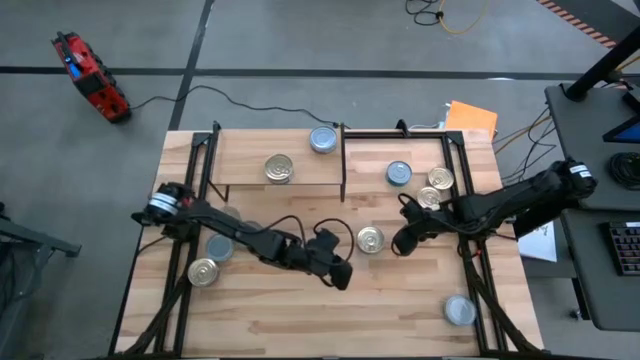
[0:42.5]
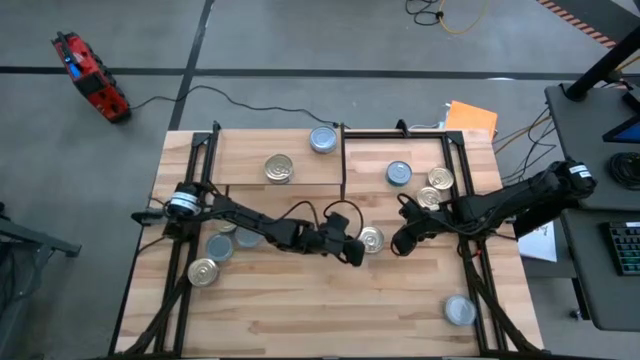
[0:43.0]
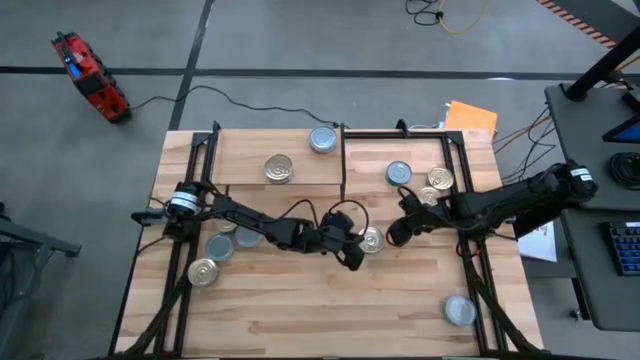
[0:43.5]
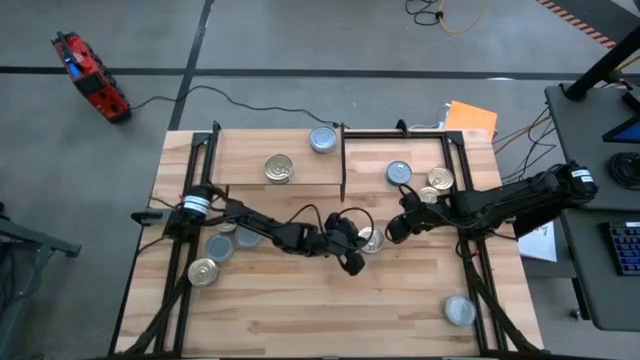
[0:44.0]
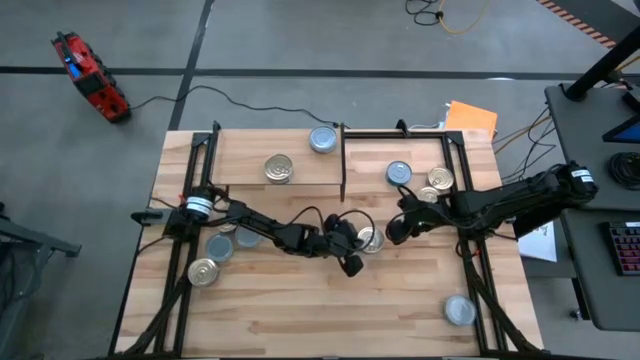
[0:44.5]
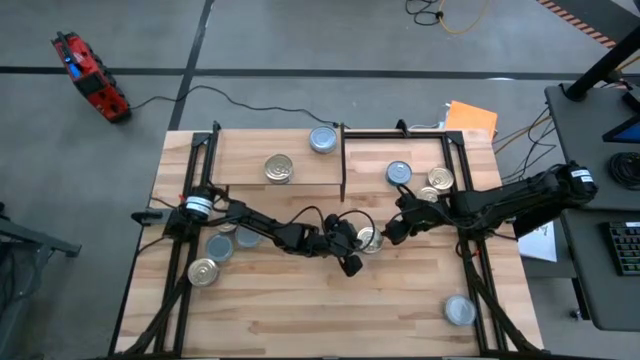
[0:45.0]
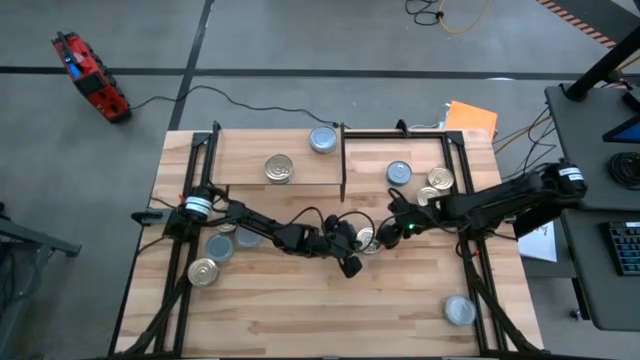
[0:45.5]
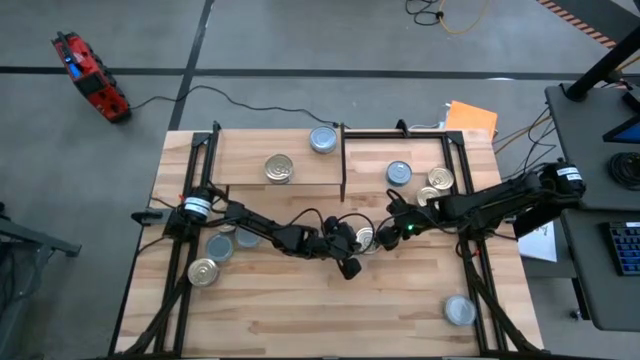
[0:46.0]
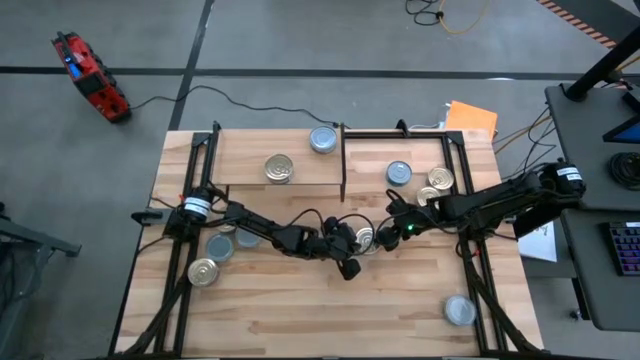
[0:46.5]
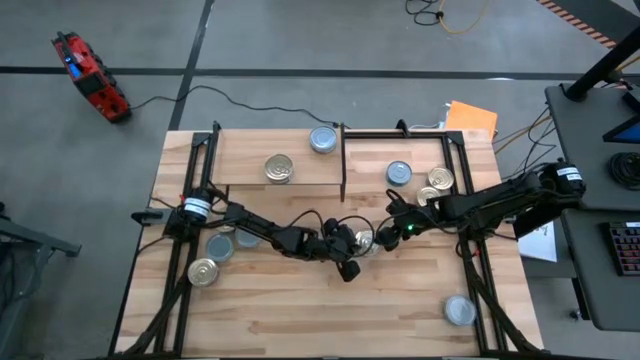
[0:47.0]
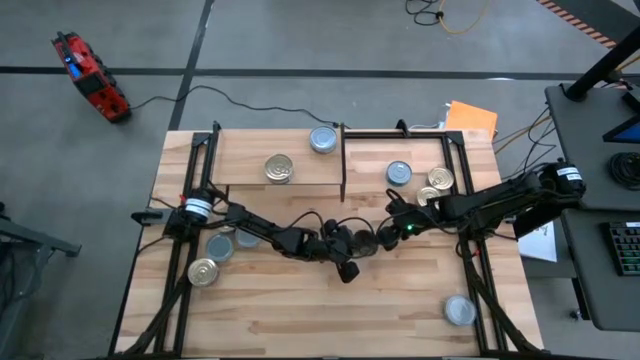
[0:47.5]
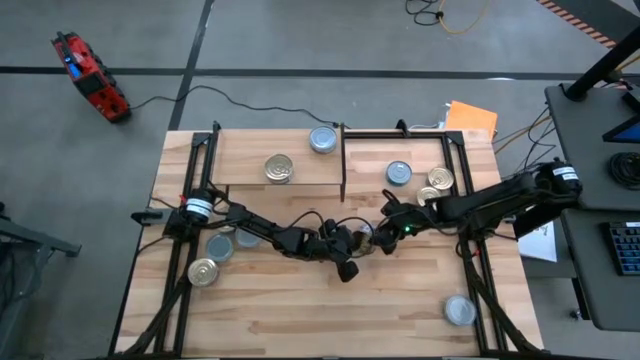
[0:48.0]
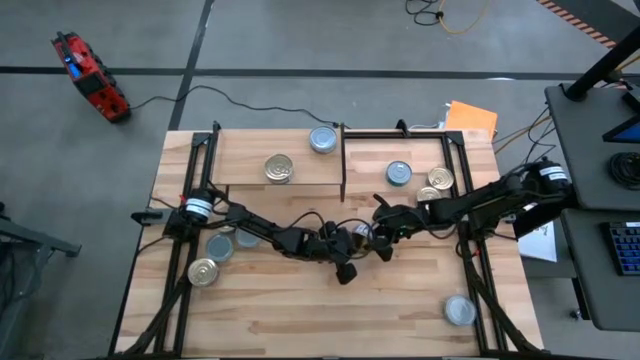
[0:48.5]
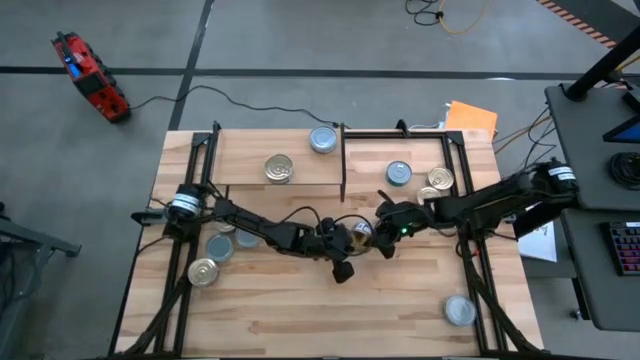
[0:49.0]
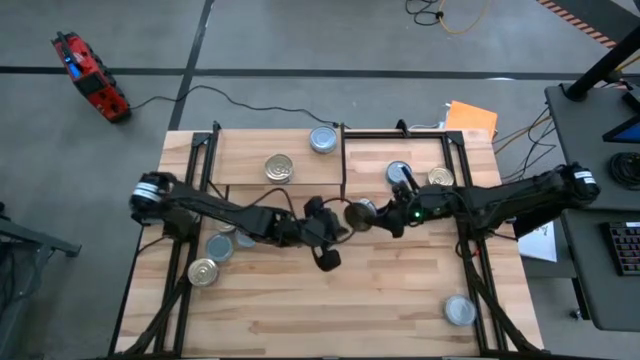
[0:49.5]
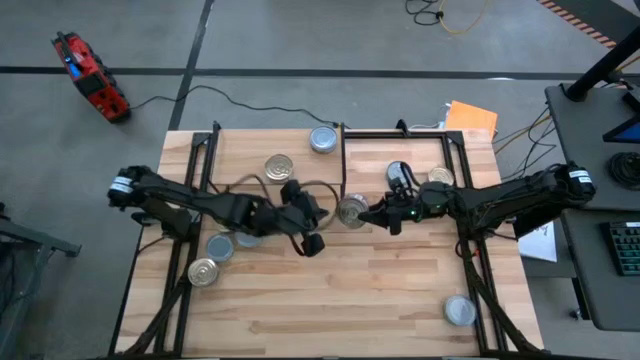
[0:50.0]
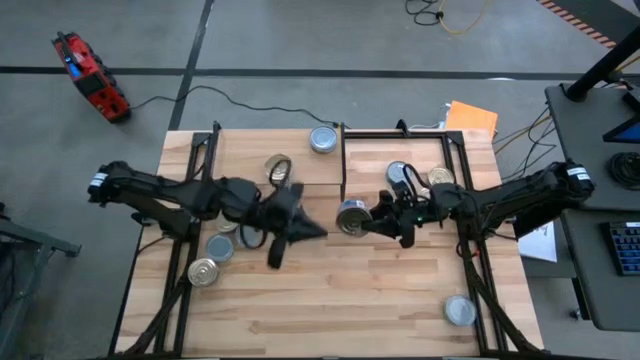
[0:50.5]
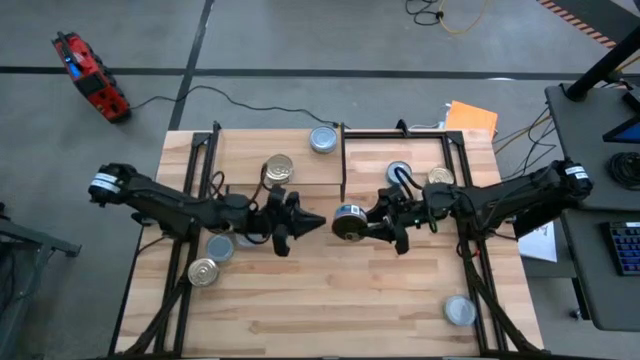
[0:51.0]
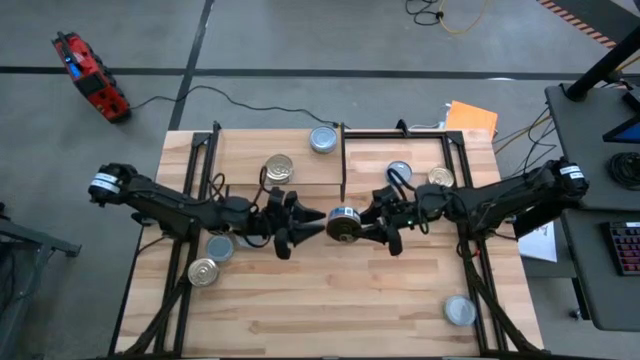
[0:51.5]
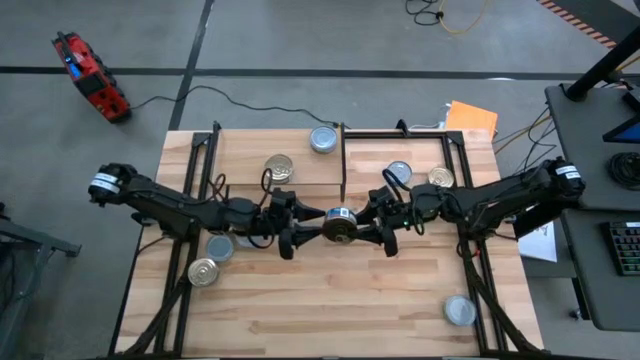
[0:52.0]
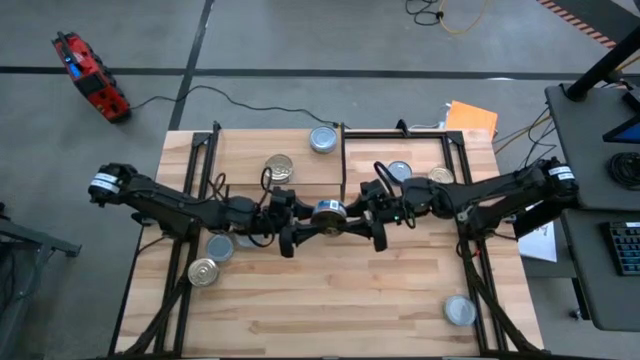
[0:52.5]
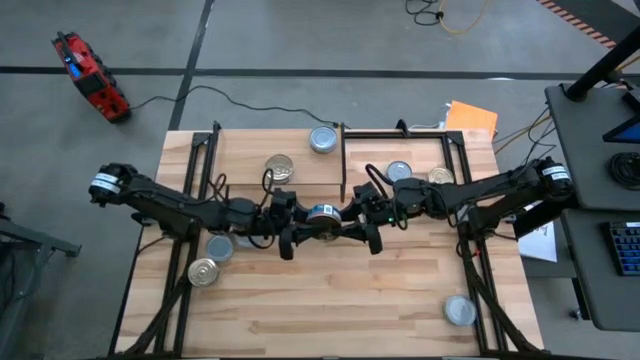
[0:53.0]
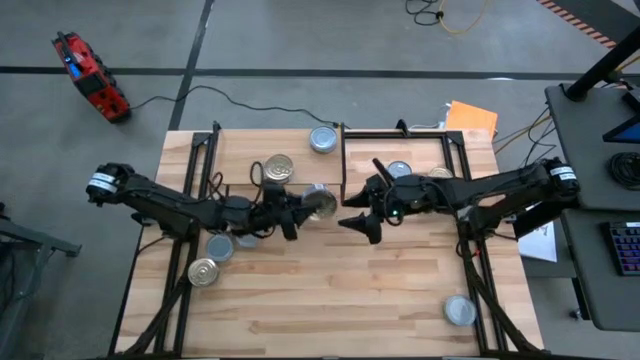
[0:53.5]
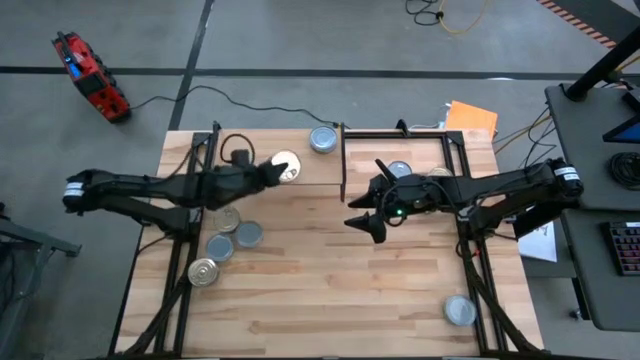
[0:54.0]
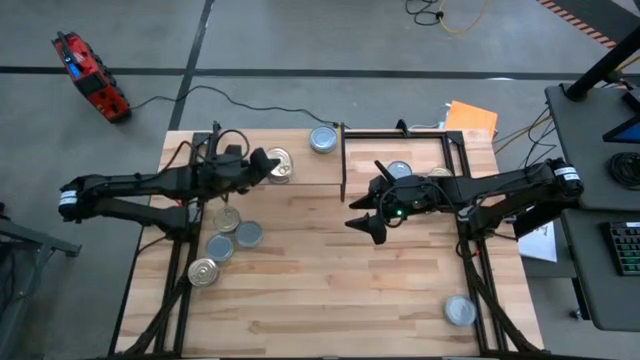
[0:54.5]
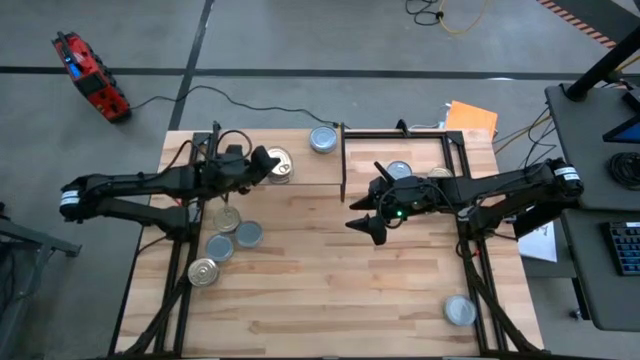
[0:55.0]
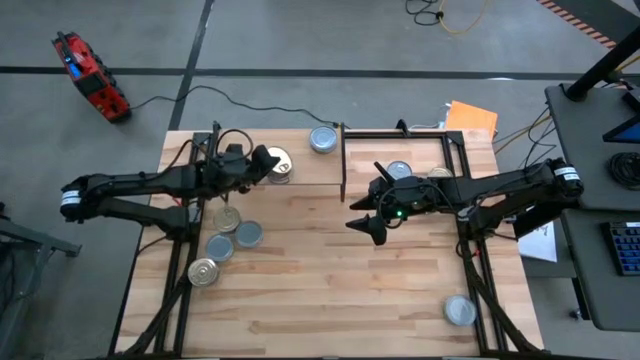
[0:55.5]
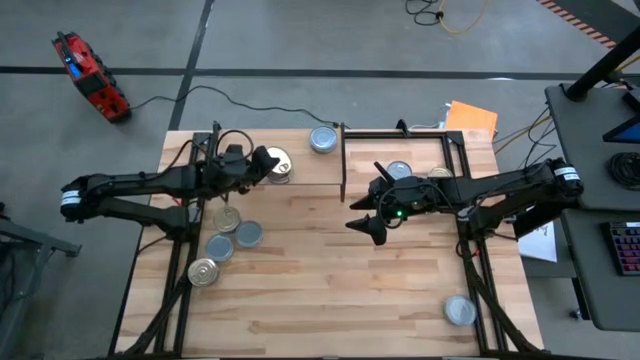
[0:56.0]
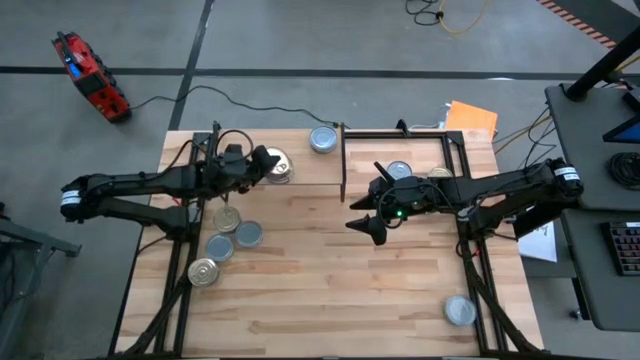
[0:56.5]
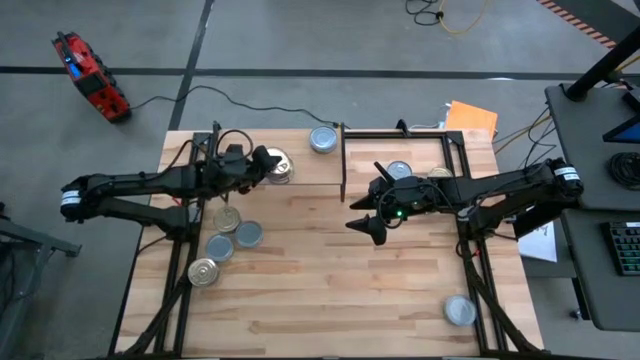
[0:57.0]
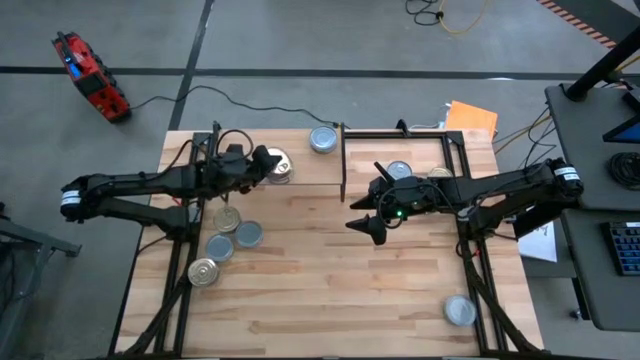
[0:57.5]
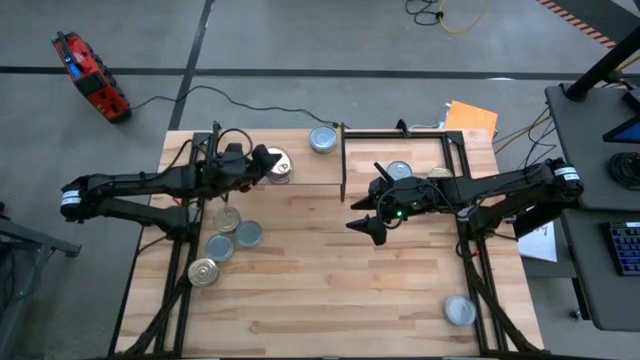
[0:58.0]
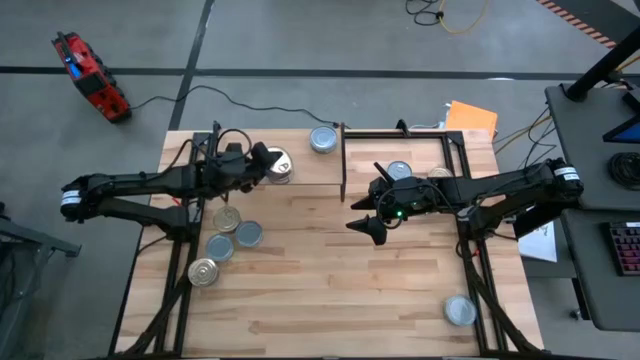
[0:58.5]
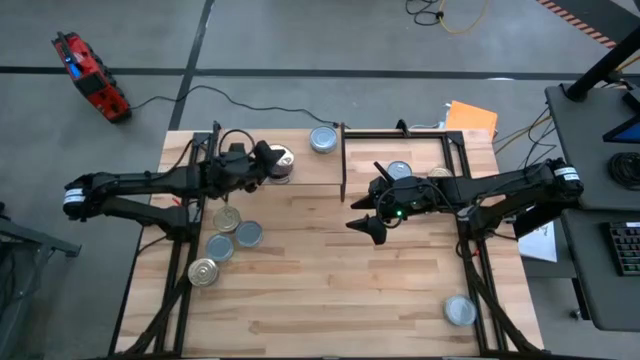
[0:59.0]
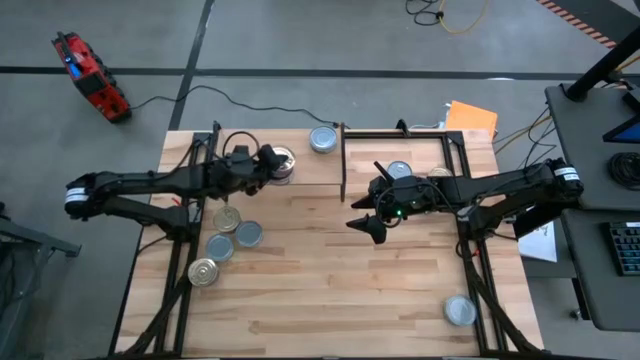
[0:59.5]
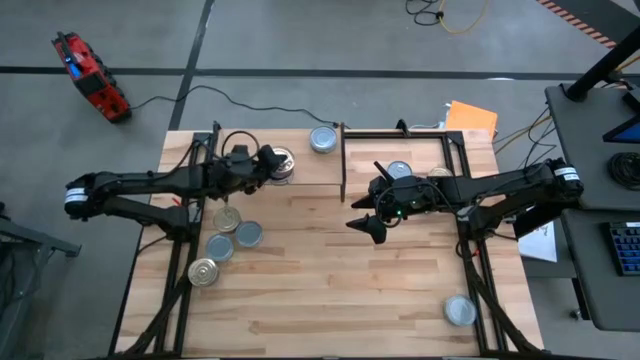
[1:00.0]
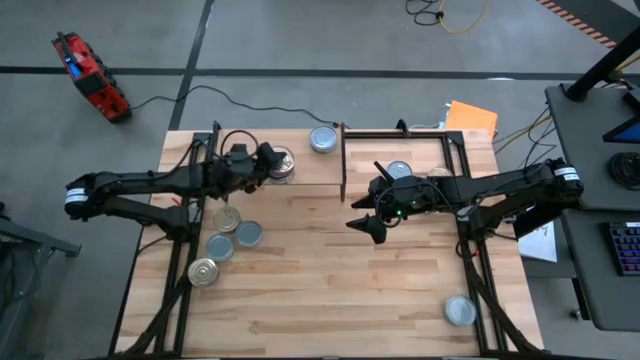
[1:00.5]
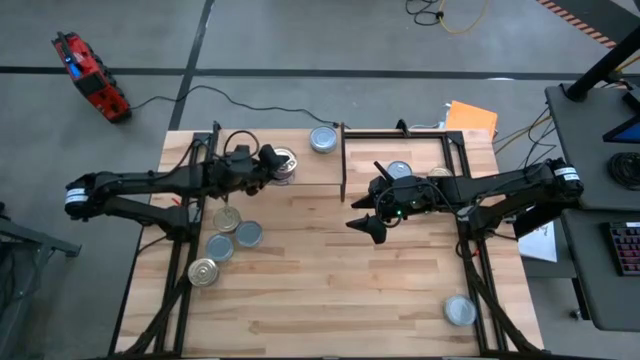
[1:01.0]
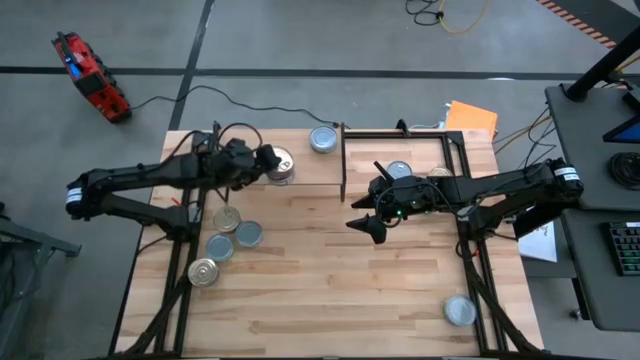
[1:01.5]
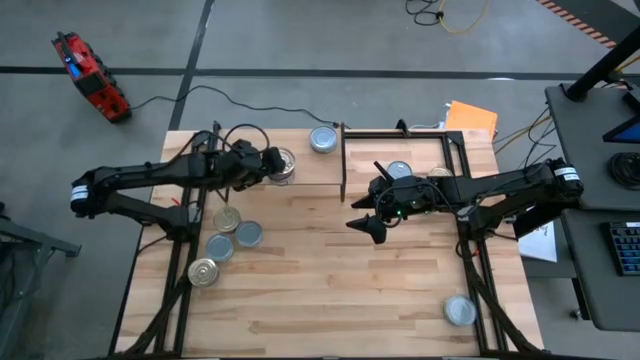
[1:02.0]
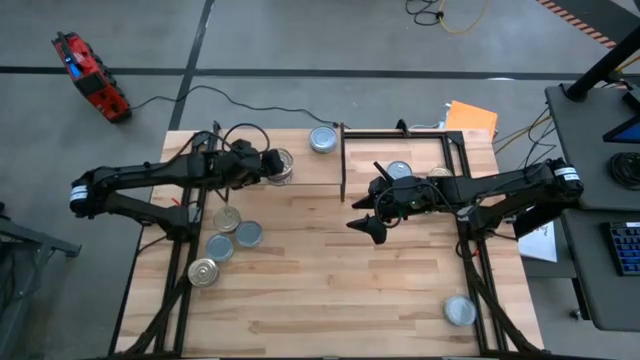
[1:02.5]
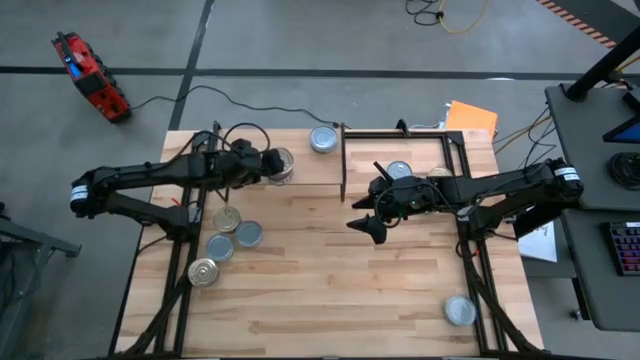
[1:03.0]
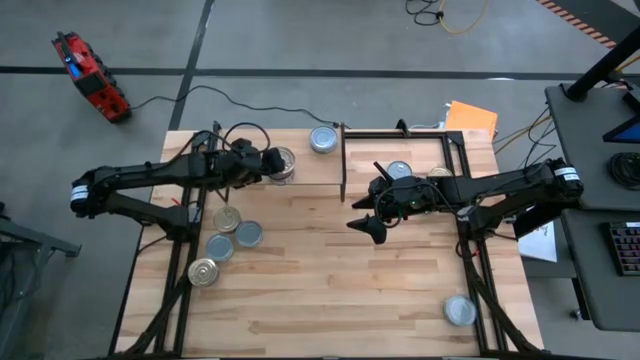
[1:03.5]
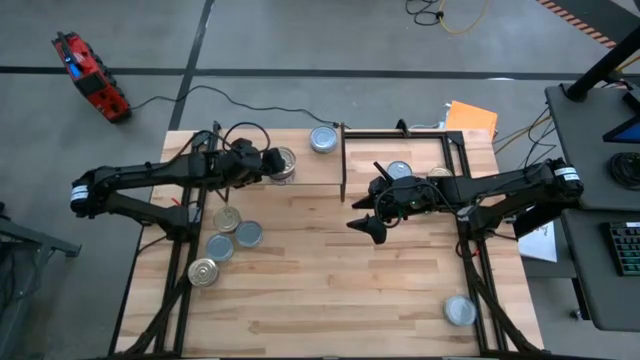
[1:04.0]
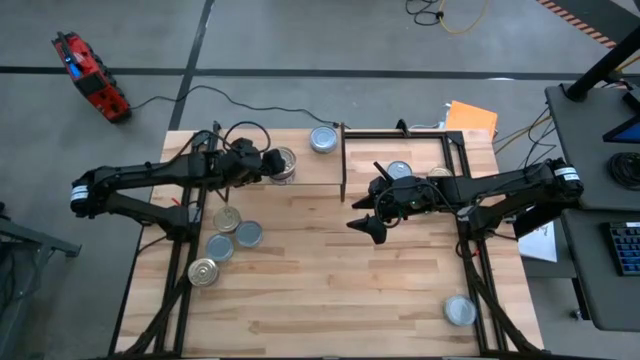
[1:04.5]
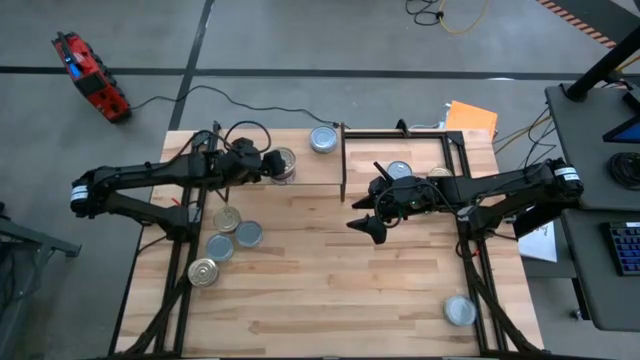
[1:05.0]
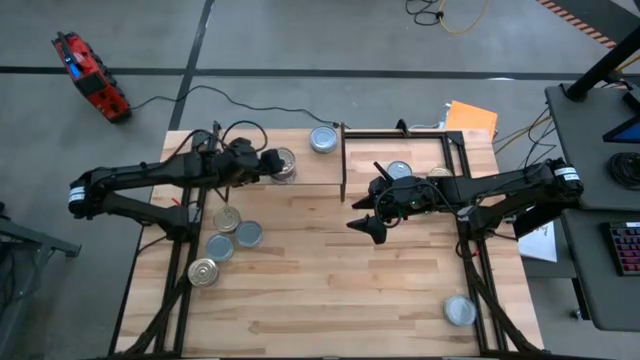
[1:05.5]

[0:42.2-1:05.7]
Task: Stack canned seafood by type on shelf
Stack the blue and pink tuna can on top of the blue and pink tuna can on the shelf
